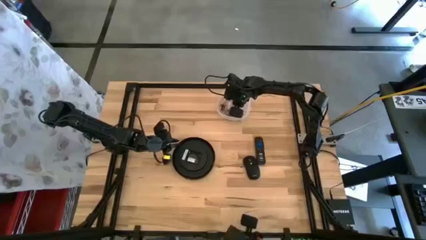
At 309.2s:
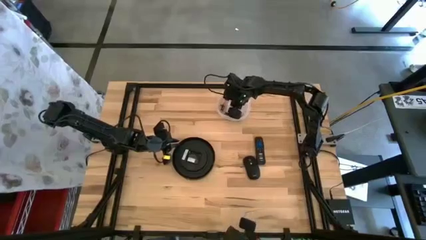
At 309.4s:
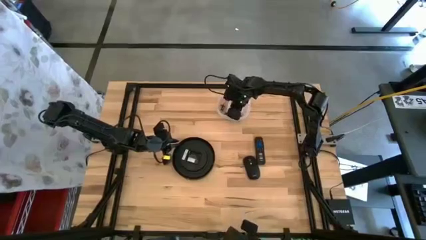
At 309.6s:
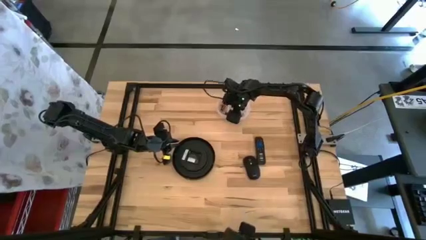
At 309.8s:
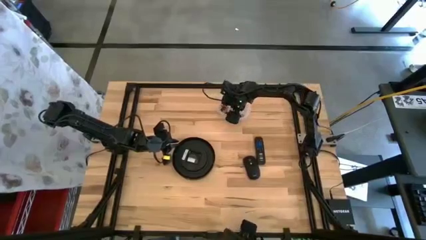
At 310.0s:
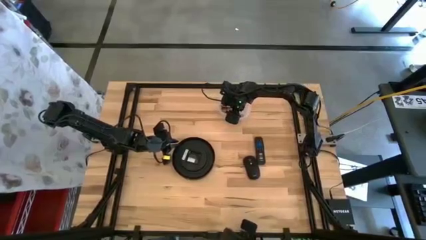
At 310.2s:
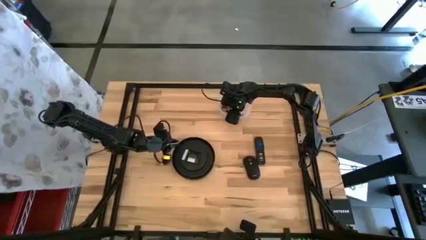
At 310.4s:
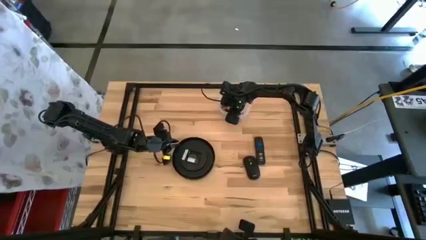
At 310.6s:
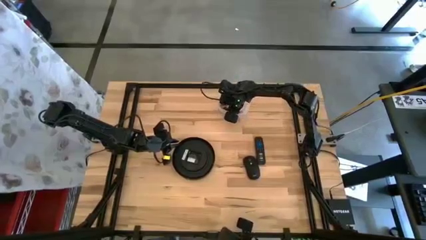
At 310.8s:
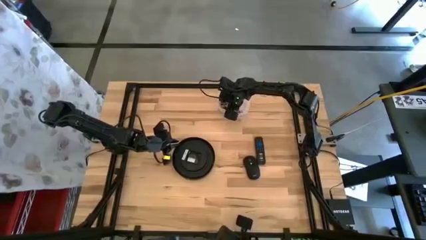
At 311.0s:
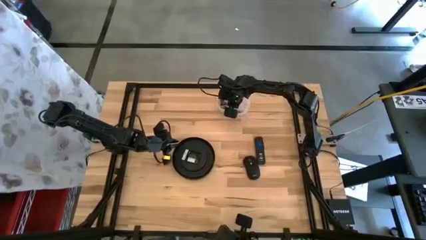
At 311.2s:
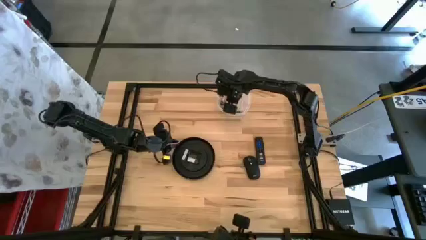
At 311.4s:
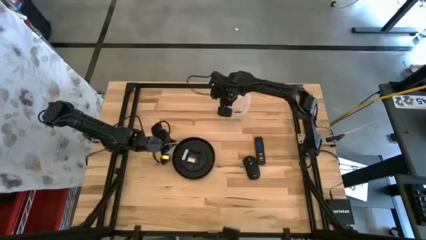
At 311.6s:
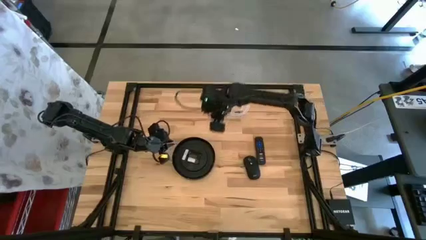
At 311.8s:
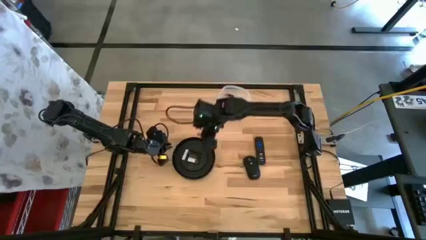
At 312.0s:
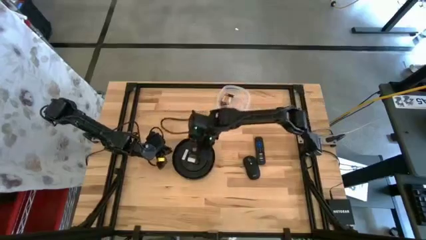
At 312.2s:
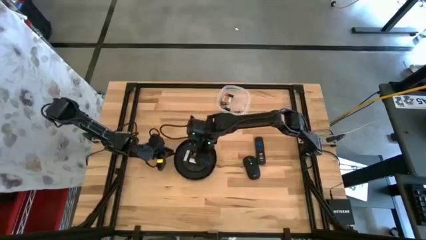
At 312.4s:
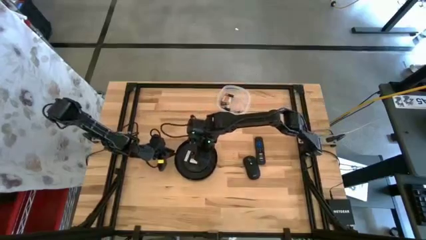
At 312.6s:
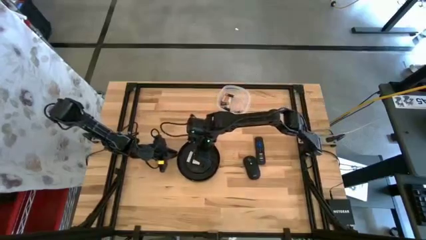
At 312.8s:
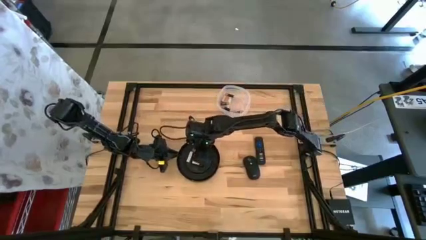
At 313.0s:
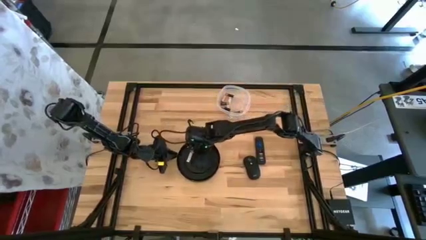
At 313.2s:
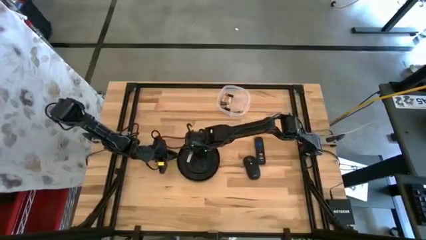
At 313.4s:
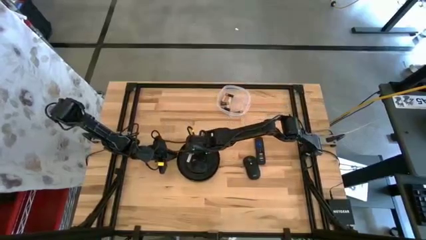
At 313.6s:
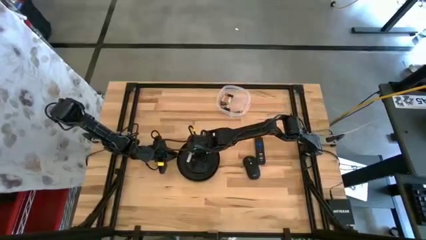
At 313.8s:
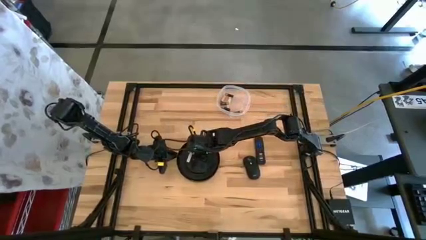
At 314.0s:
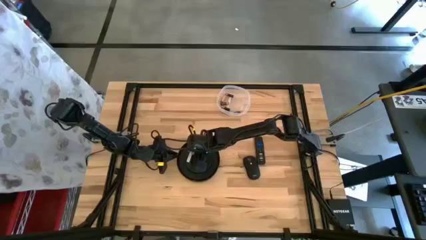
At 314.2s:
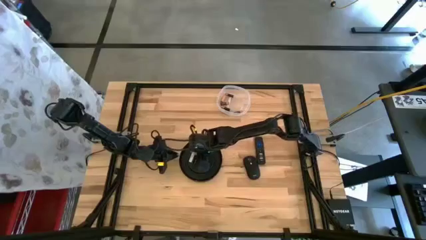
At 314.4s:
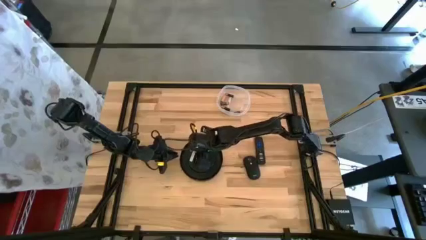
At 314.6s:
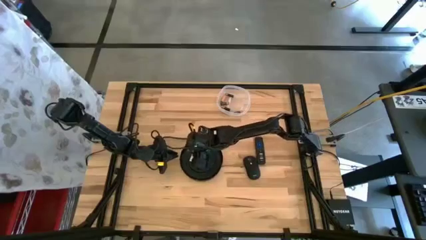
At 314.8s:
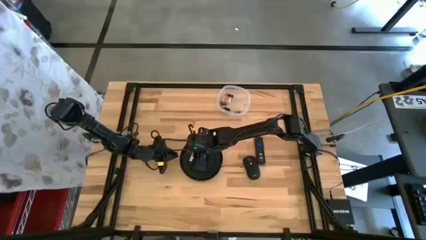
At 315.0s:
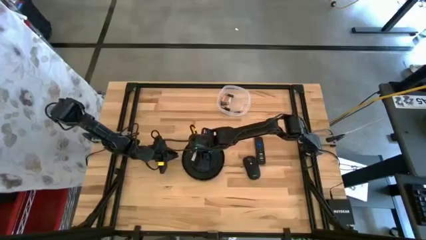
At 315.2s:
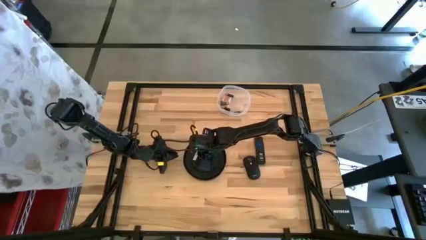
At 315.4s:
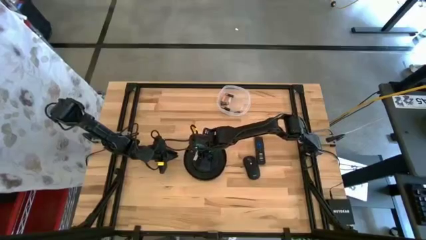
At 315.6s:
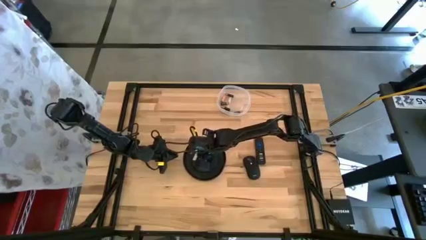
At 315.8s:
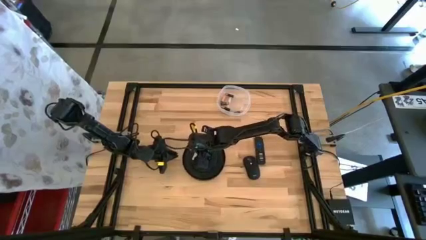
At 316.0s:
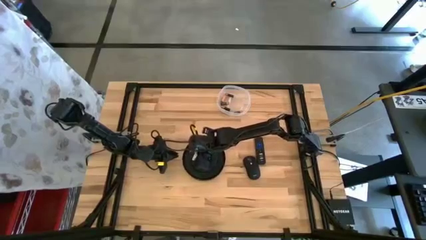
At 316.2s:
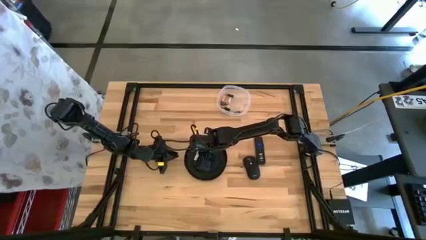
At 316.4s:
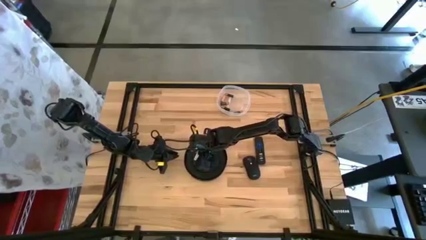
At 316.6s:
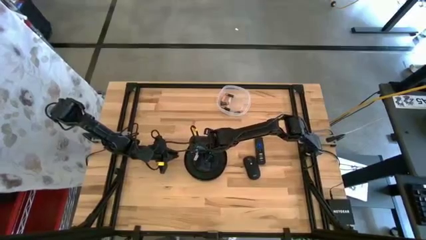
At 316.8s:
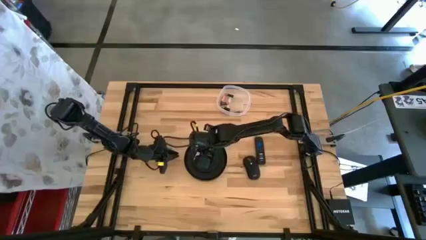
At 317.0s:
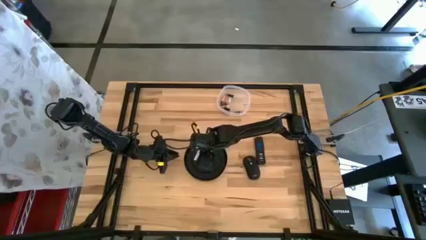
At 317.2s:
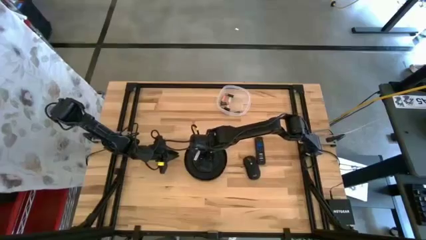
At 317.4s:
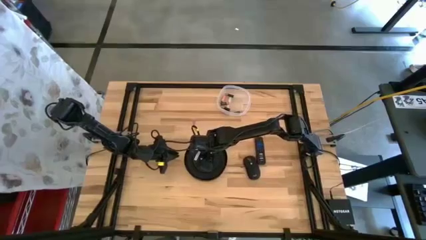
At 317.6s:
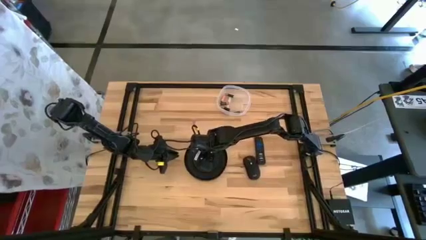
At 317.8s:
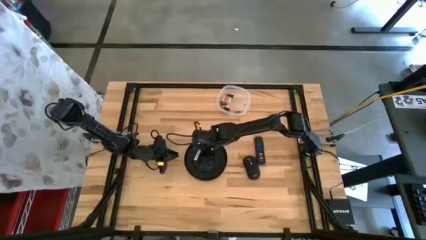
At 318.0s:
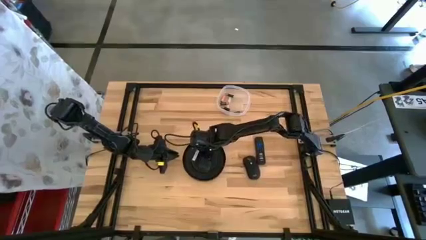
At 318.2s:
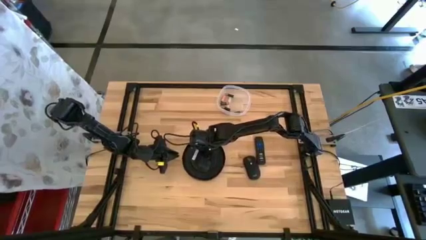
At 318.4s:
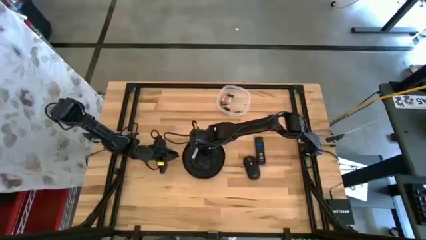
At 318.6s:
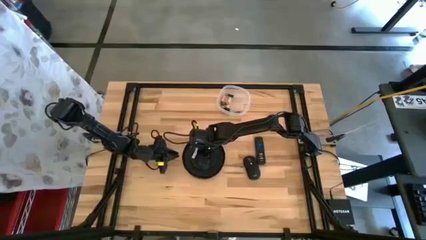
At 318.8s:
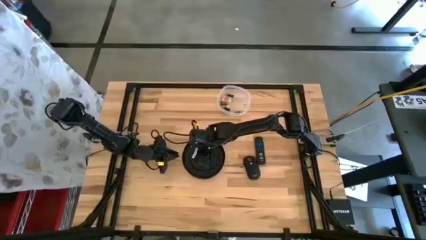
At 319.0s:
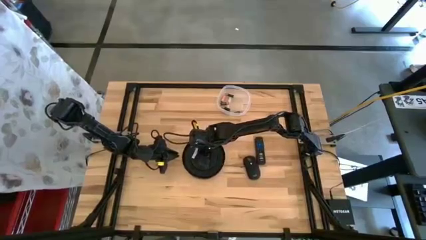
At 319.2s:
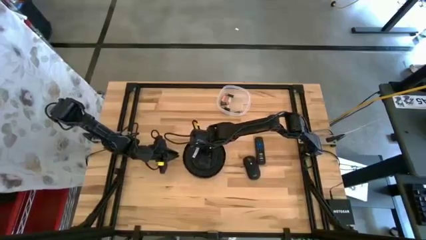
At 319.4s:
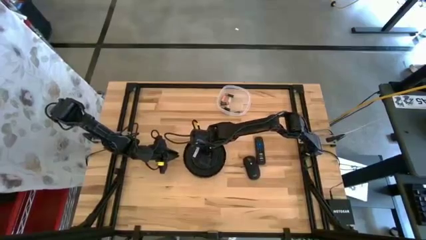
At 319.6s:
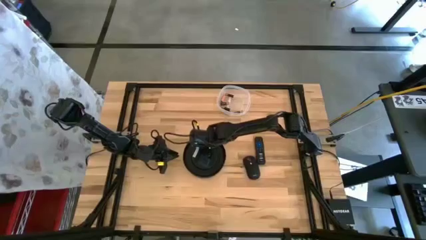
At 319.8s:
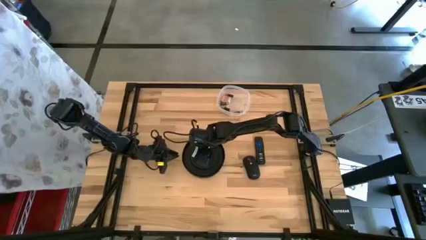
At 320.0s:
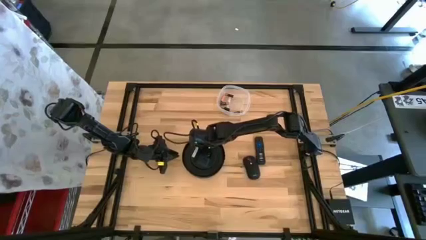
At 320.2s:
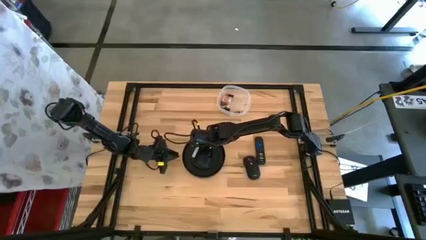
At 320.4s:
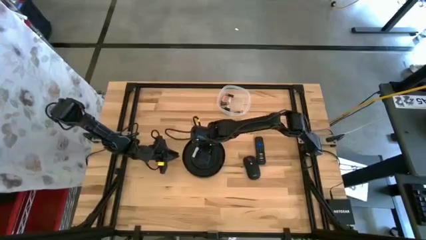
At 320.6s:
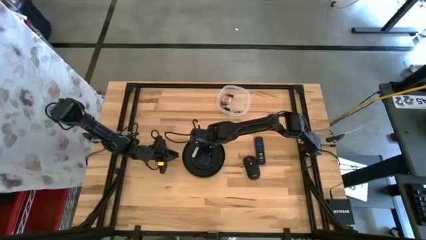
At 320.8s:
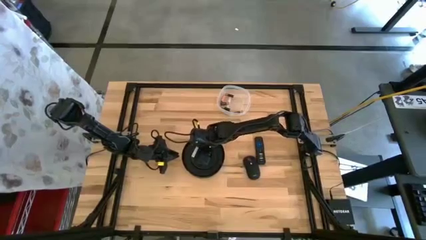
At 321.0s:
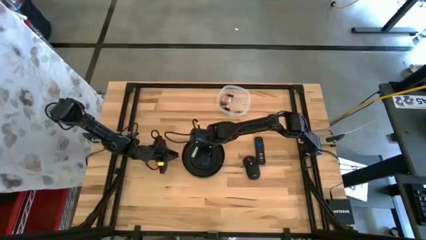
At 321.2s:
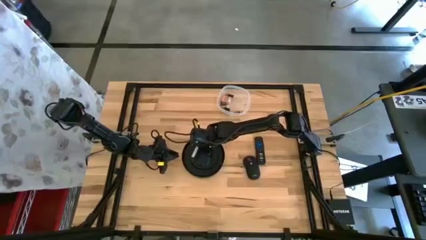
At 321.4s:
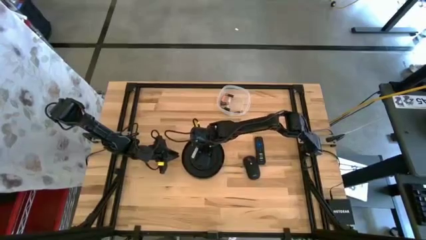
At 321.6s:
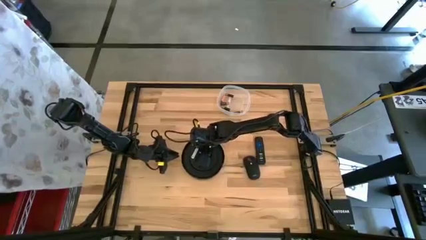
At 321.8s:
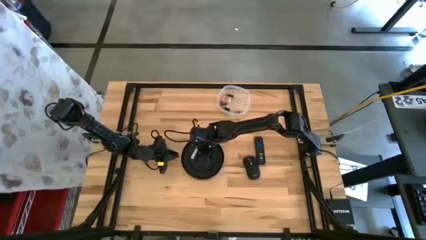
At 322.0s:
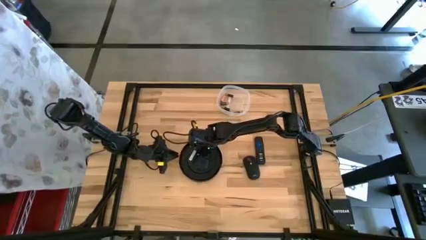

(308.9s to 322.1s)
Task: Insert battery
Insert the black battery into the wall clock
